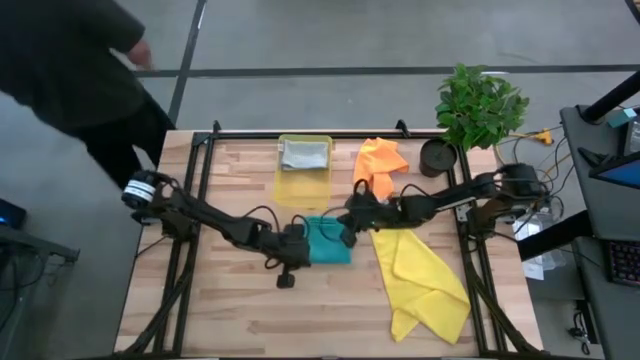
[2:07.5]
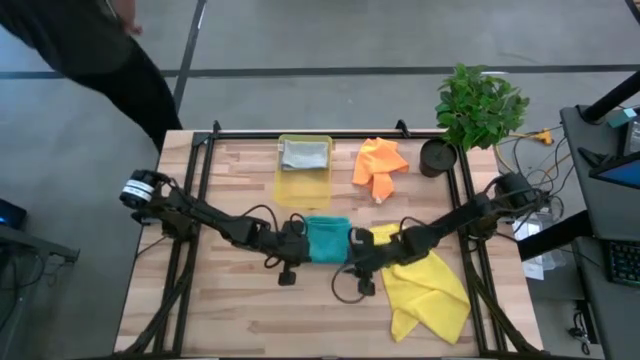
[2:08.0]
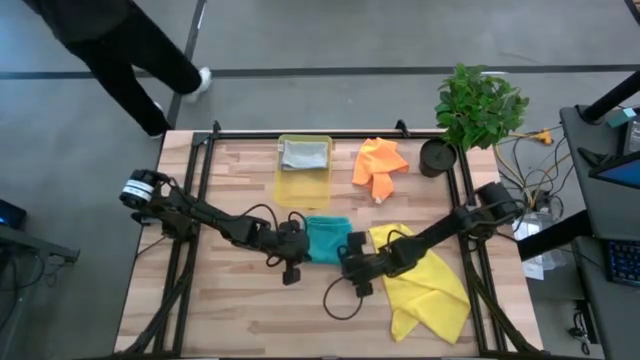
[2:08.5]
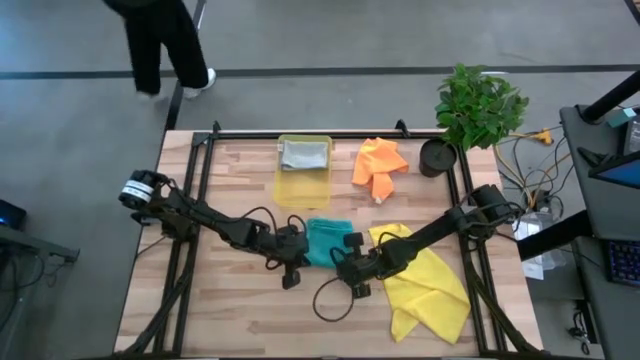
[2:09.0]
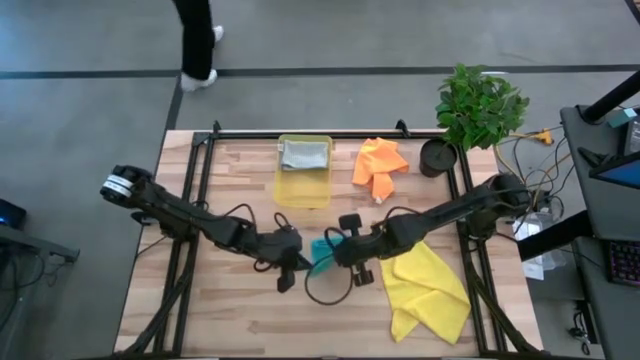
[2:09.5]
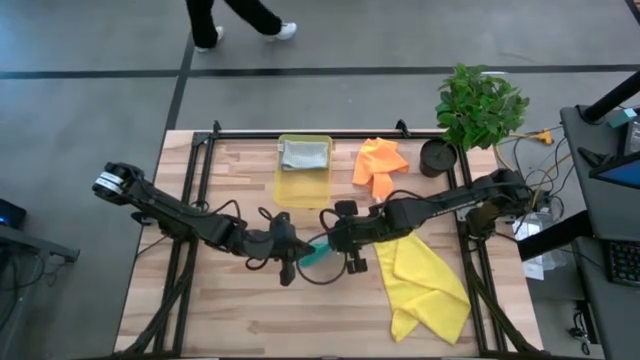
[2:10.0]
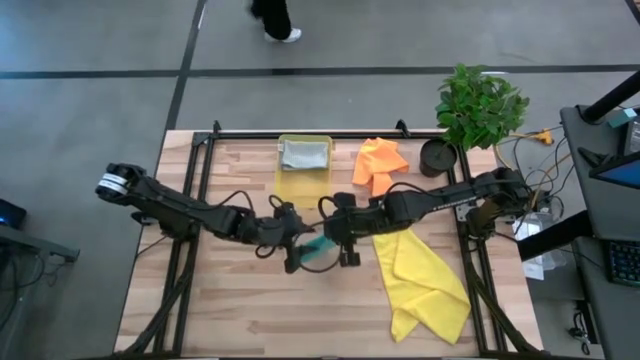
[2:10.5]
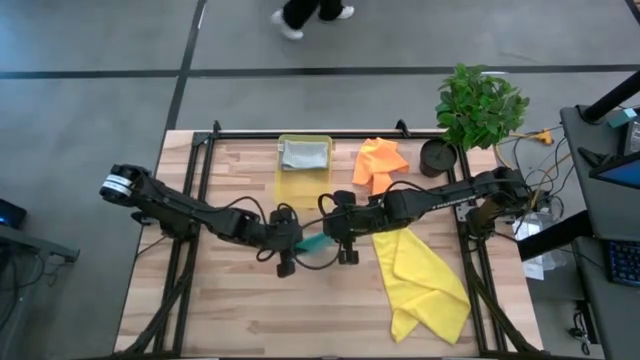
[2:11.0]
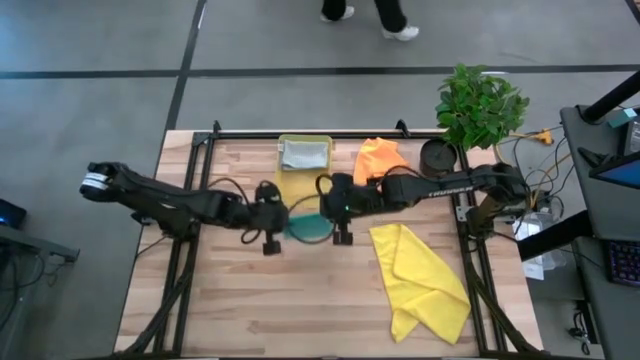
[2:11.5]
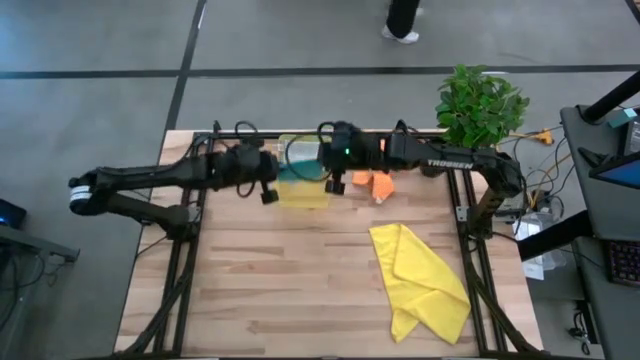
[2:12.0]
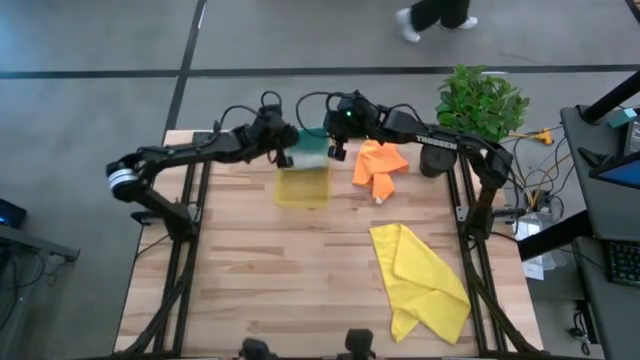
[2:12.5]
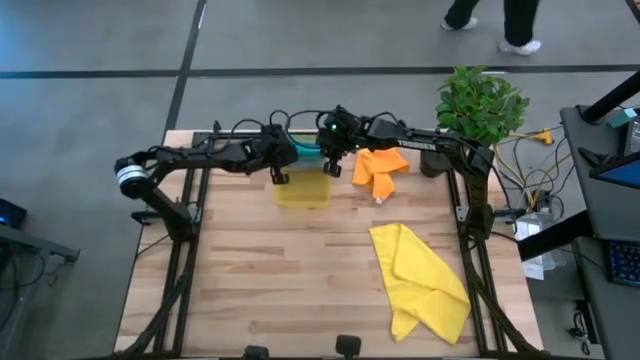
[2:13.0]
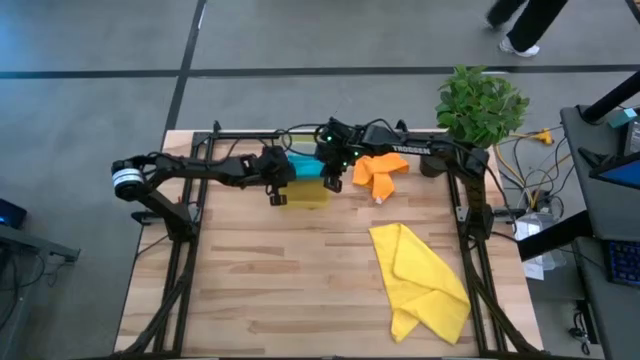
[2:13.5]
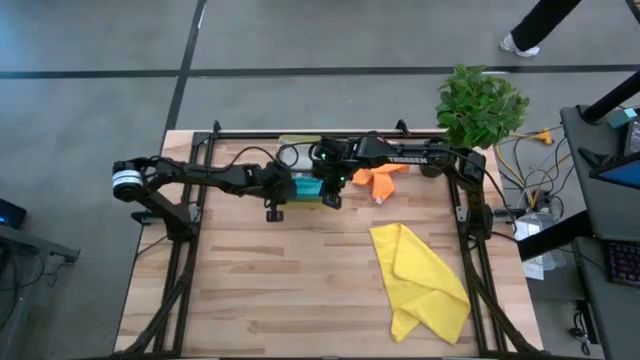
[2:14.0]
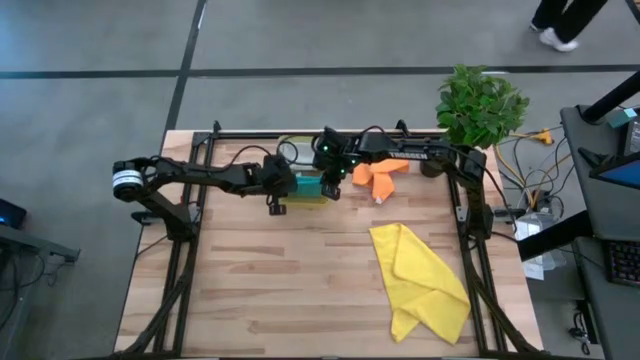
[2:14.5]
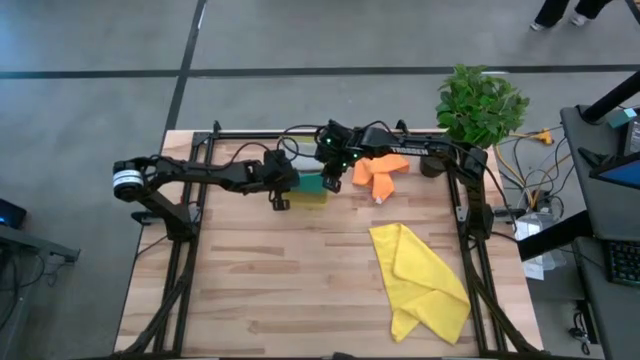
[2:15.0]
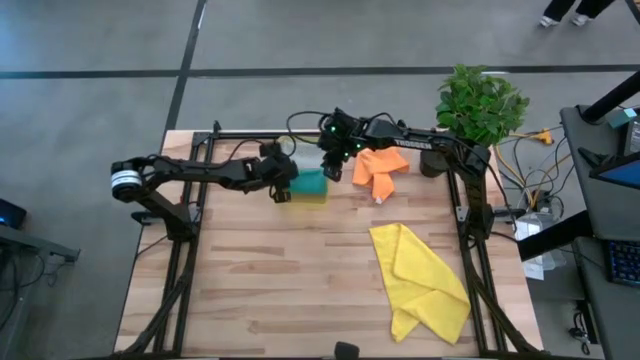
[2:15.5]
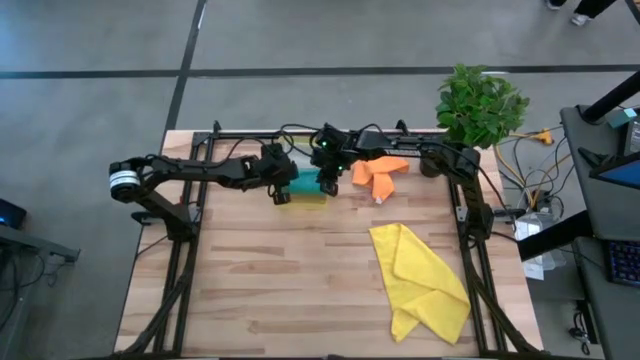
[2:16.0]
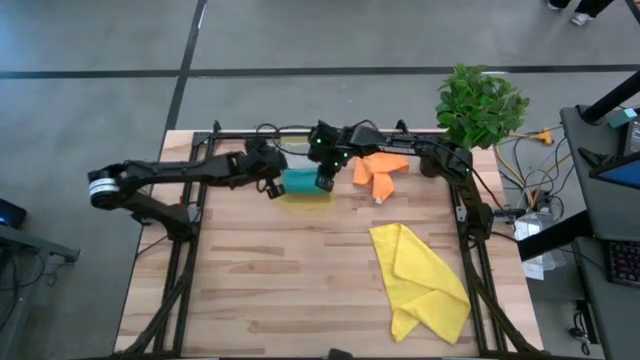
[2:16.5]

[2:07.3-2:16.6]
Task: Fold microfiber towels
Put the folded light blue microfiber cloth into the yellow bin

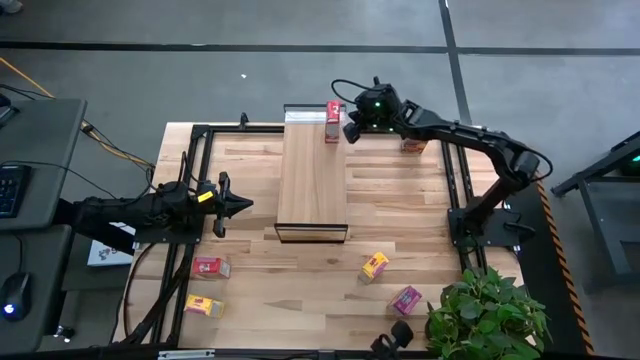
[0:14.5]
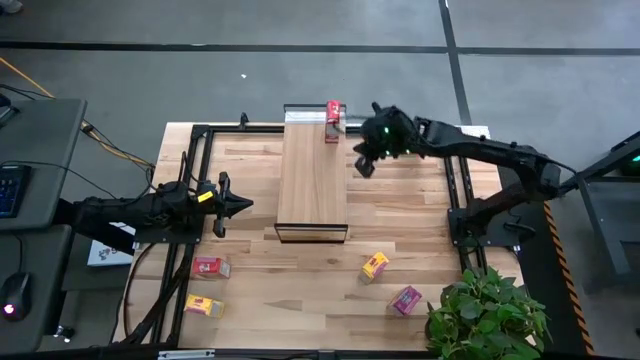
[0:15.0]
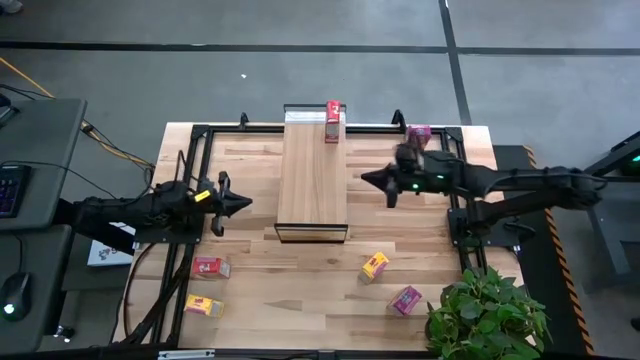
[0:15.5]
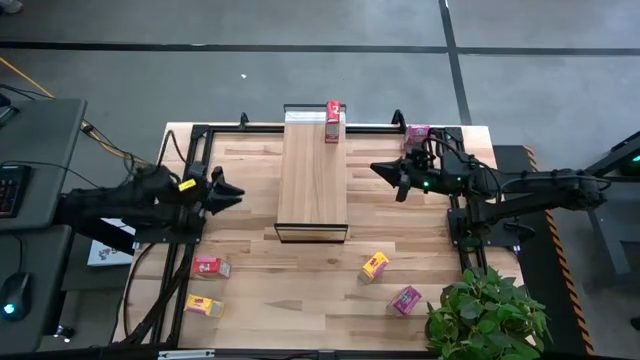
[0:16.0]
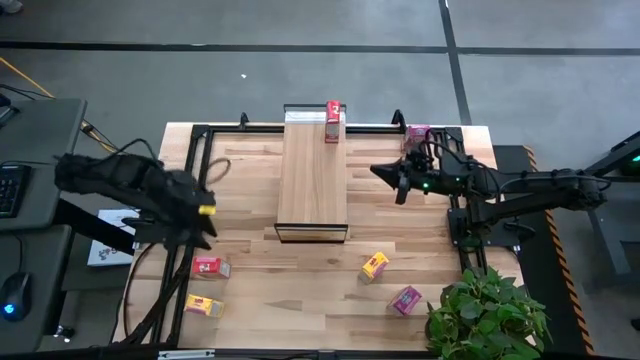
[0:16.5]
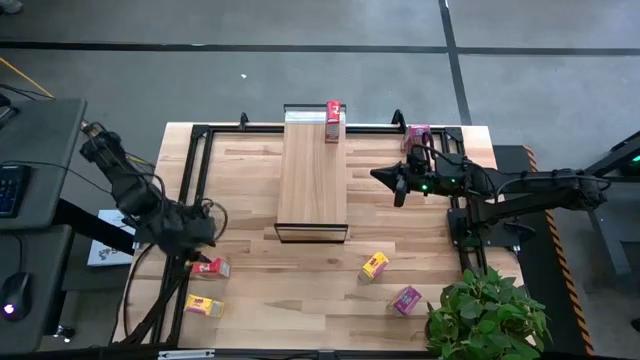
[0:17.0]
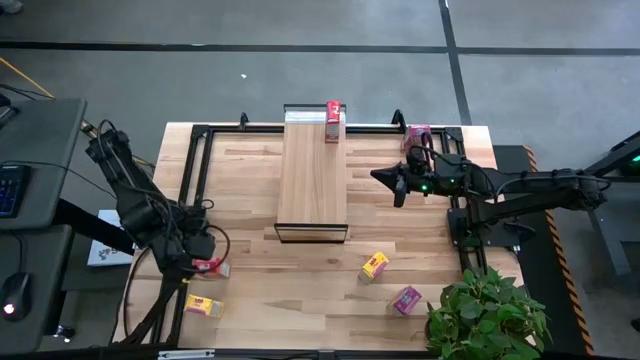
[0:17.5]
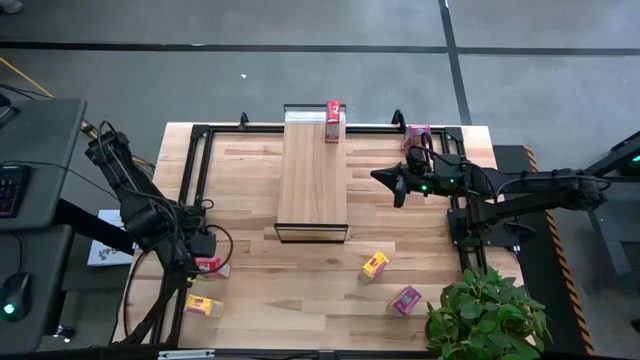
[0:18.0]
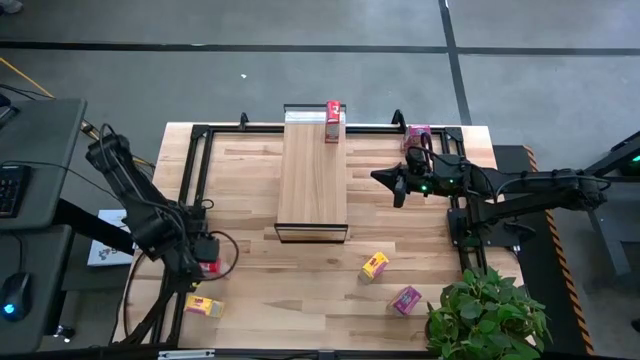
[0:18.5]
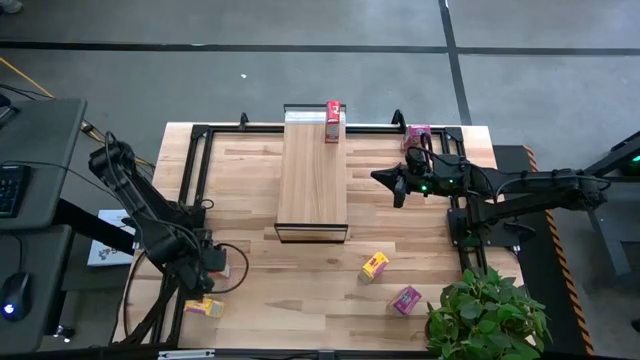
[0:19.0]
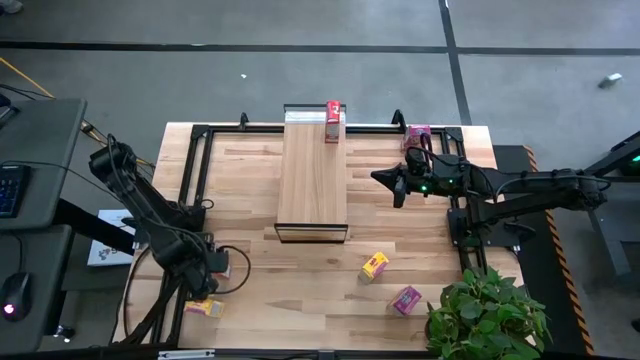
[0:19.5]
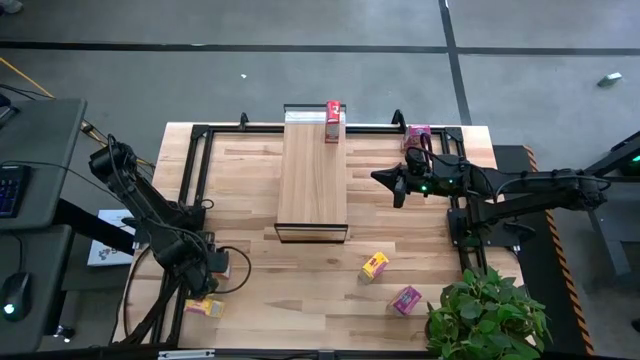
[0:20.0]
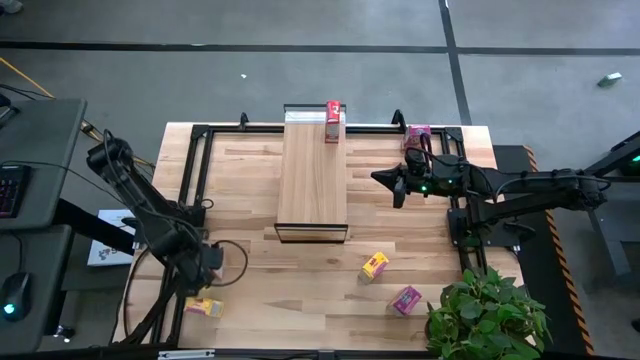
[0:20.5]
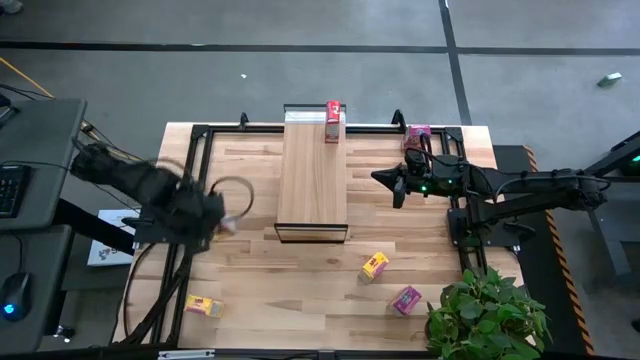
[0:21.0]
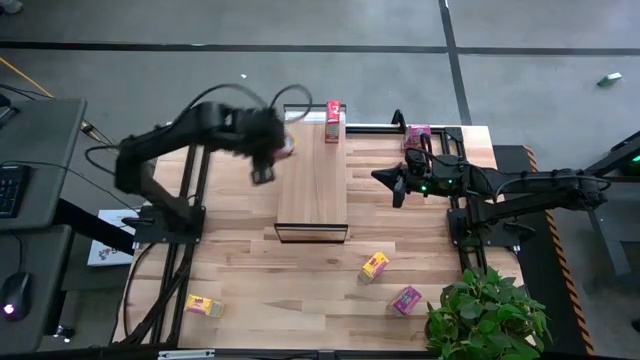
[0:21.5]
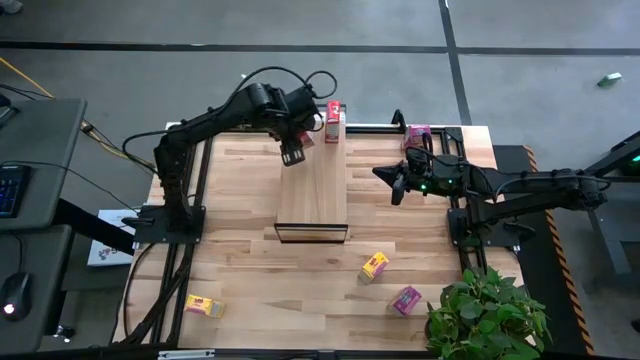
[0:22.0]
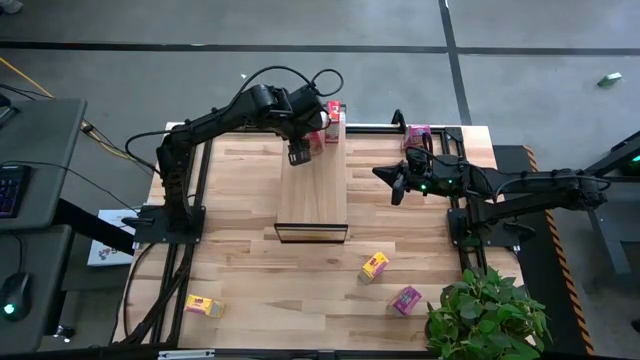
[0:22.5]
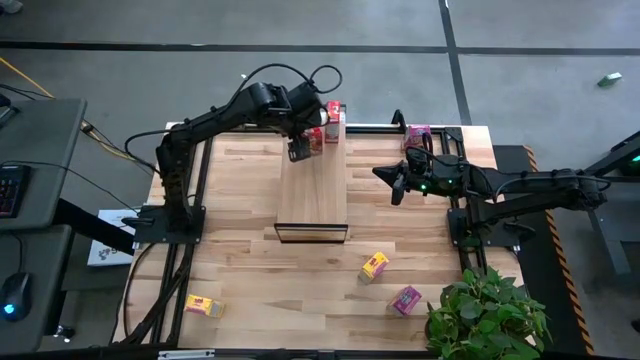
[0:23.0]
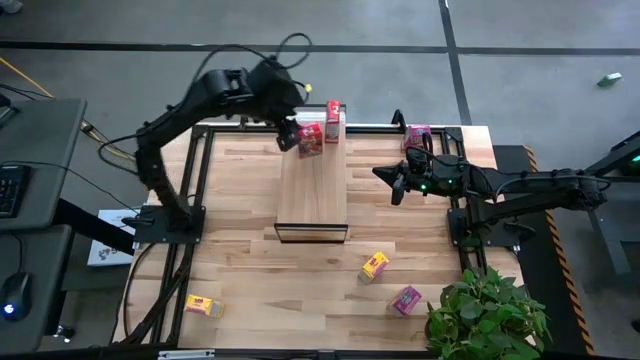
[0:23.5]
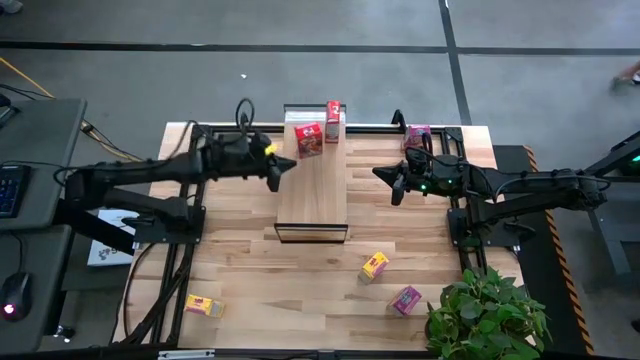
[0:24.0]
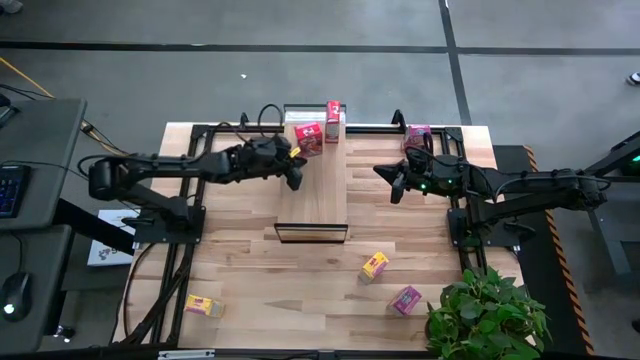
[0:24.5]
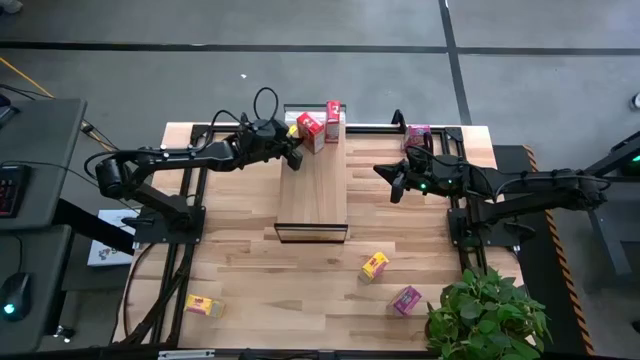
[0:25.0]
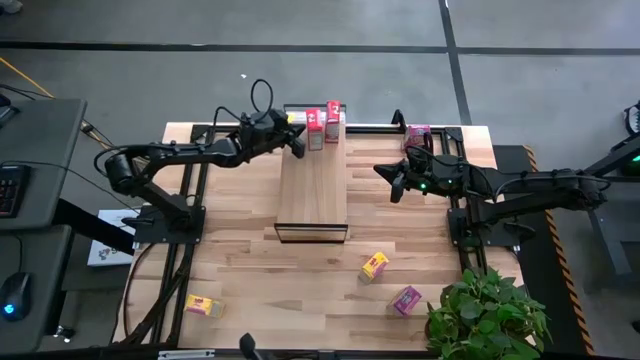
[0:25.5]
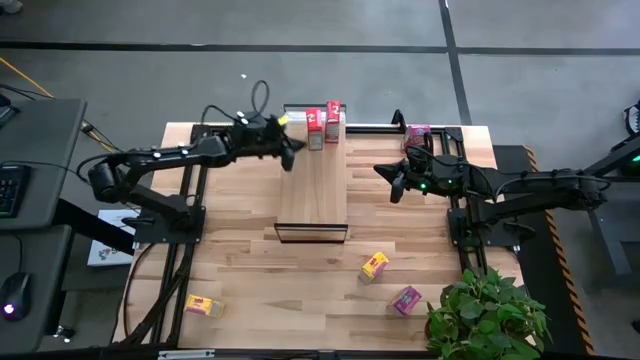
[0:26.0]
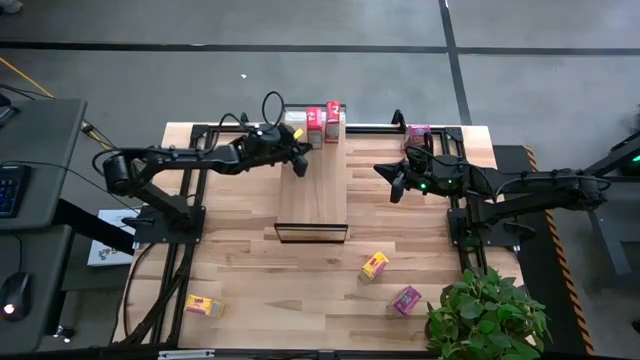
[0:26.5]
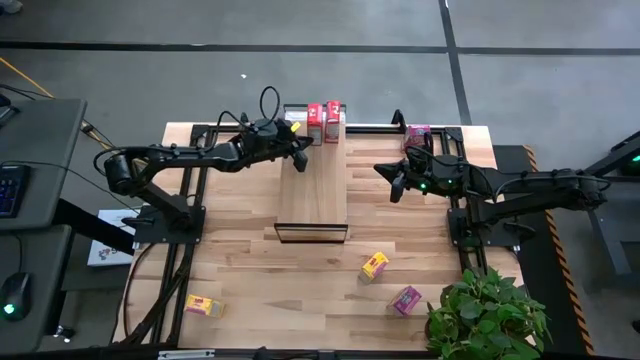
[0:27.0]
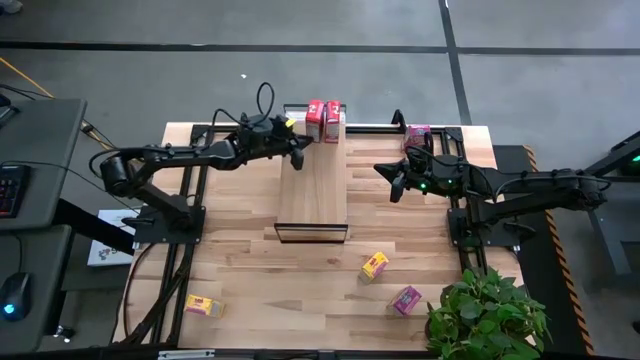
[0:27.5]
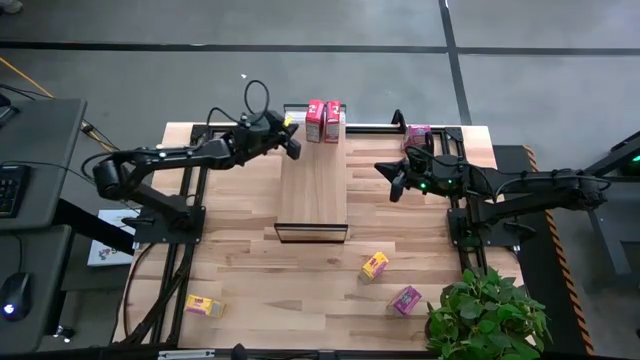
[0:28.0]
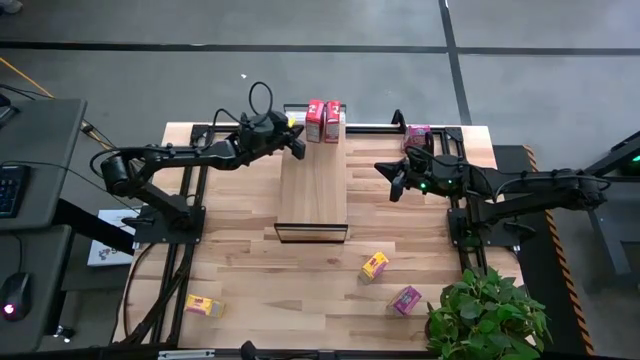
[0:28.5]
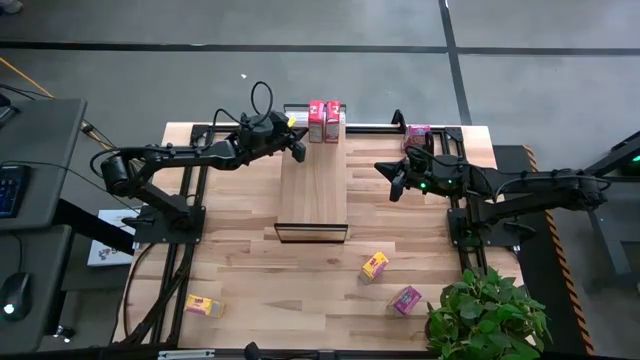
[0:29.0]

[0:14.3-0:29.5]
Task: Stack cereal on shelf
Put the red cereal box on the shelf aligned with the other red cereal box
